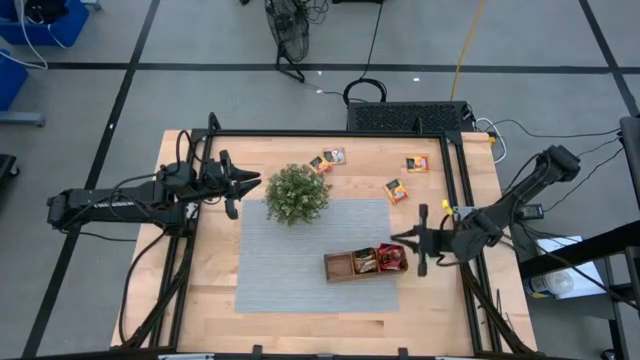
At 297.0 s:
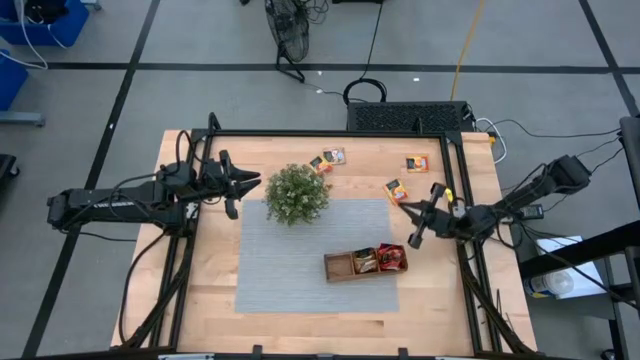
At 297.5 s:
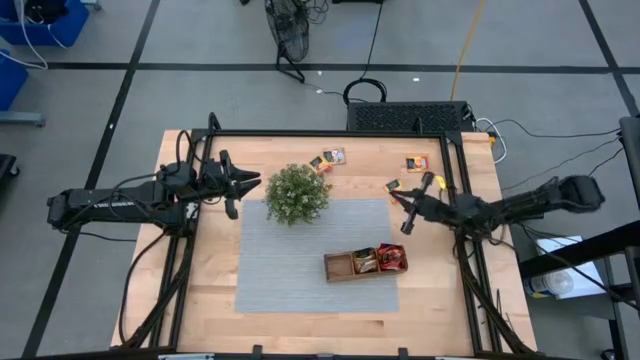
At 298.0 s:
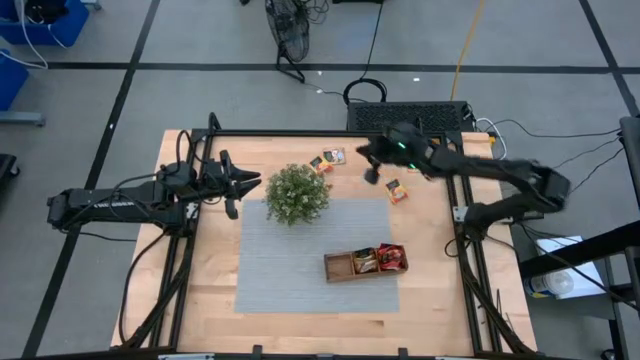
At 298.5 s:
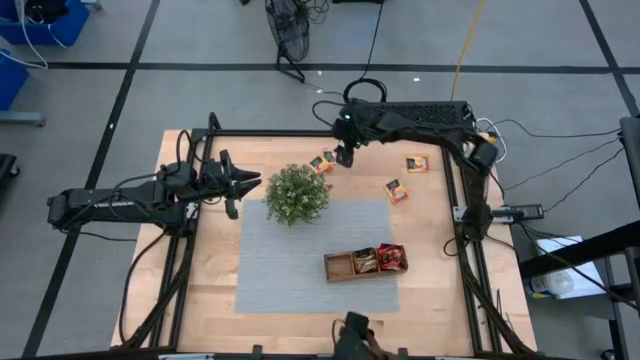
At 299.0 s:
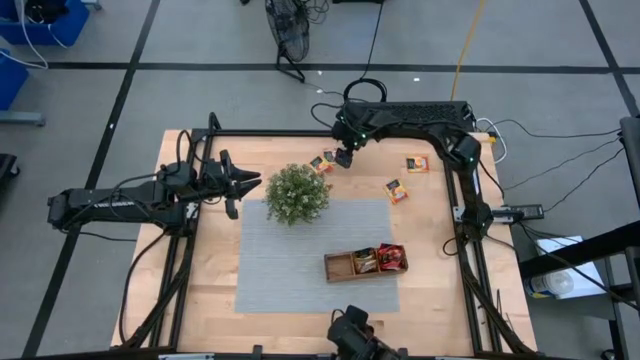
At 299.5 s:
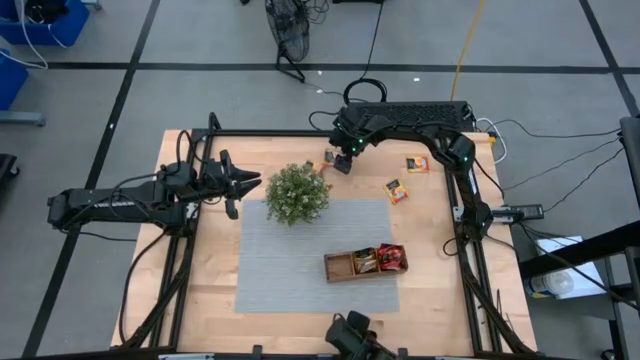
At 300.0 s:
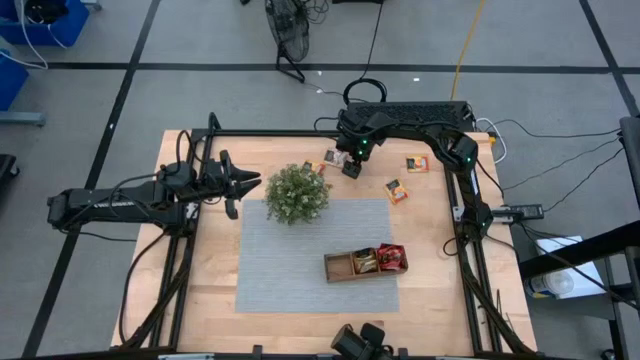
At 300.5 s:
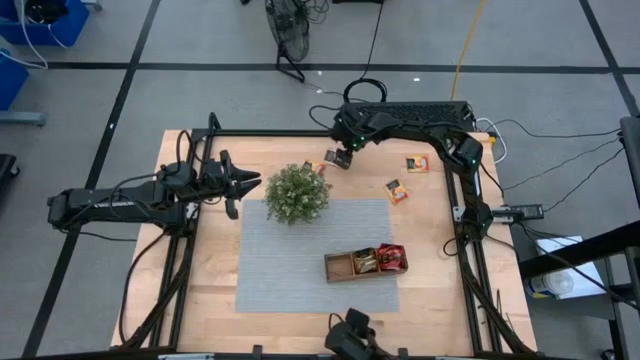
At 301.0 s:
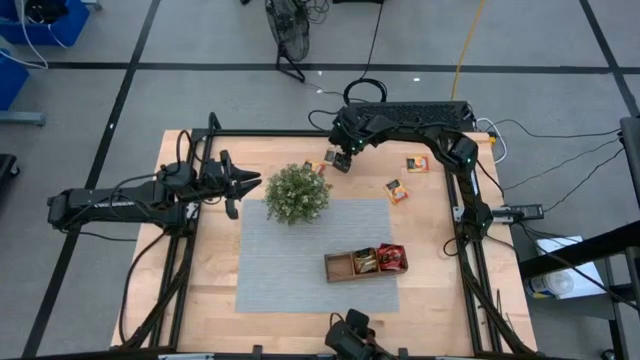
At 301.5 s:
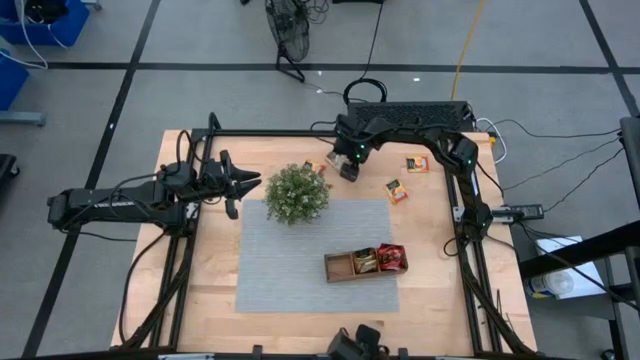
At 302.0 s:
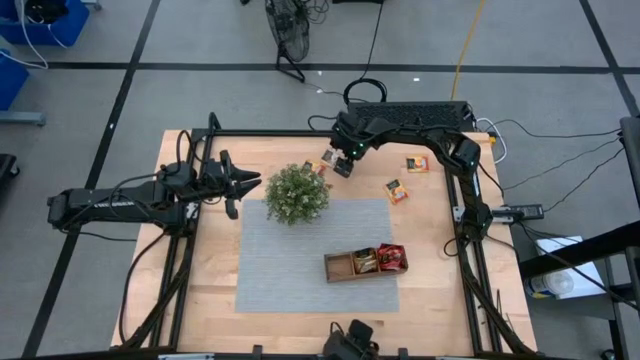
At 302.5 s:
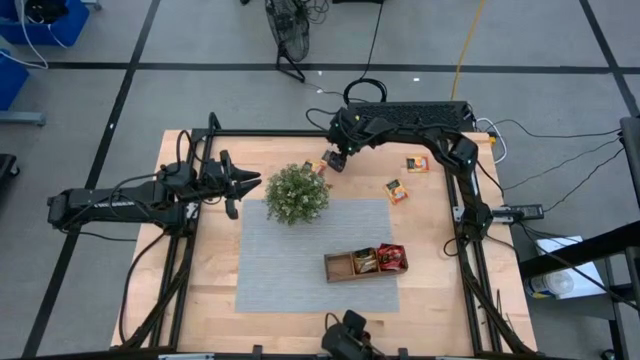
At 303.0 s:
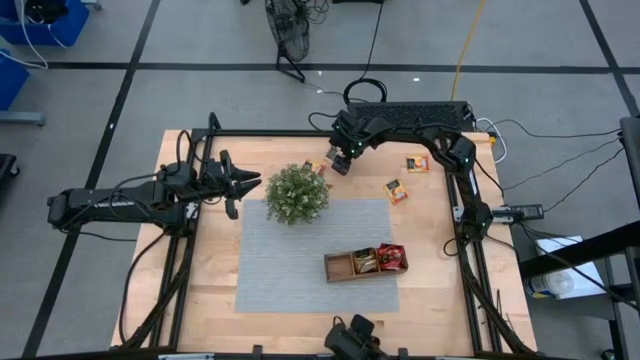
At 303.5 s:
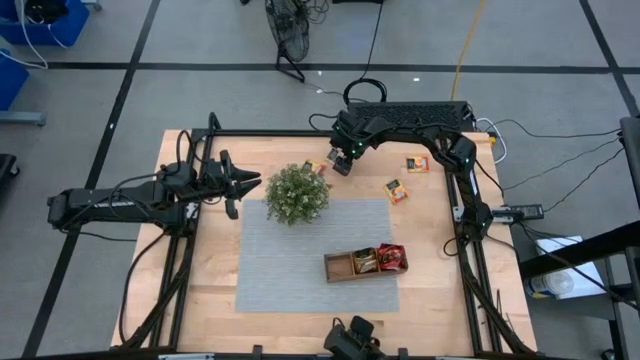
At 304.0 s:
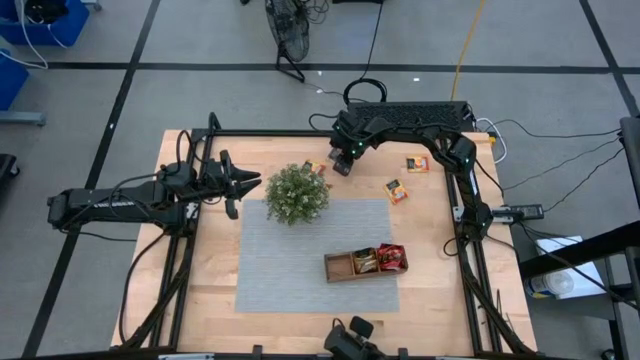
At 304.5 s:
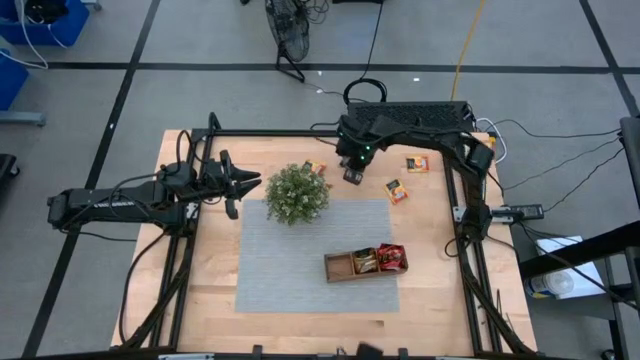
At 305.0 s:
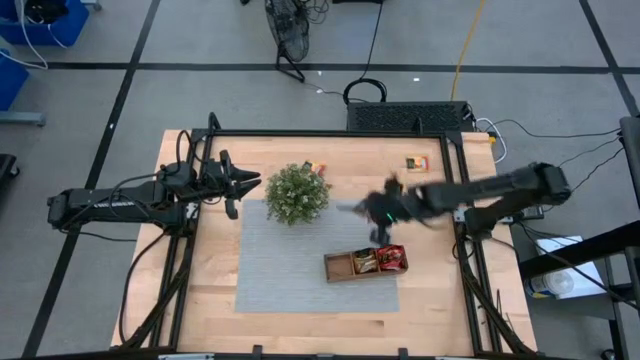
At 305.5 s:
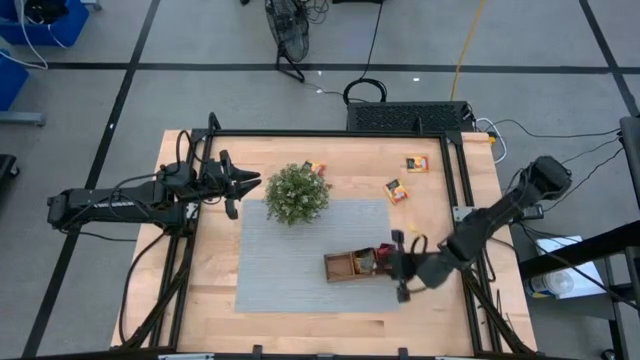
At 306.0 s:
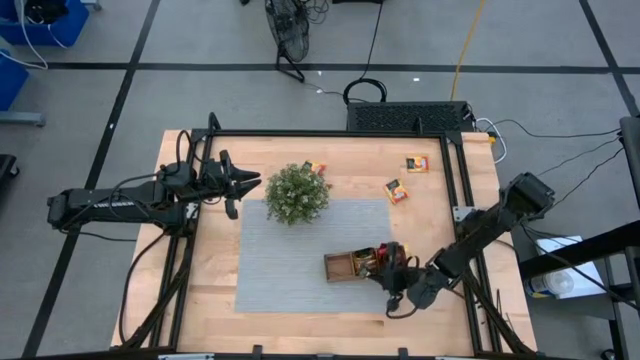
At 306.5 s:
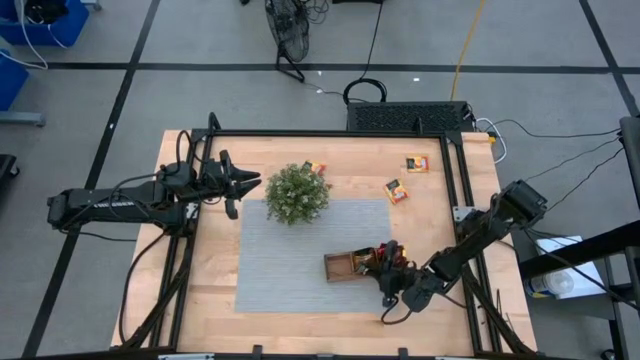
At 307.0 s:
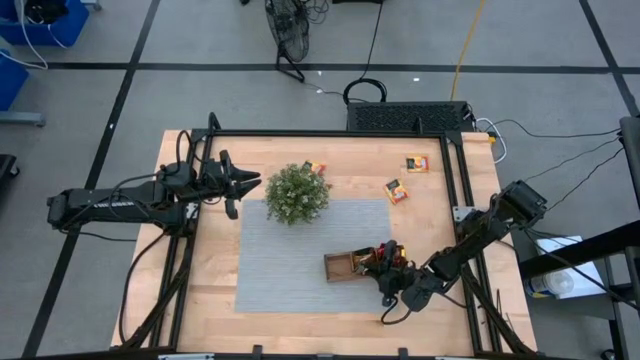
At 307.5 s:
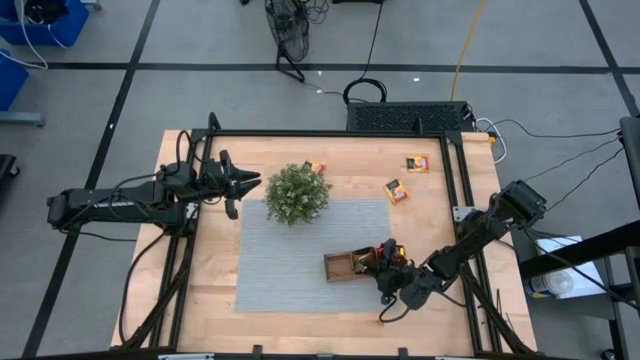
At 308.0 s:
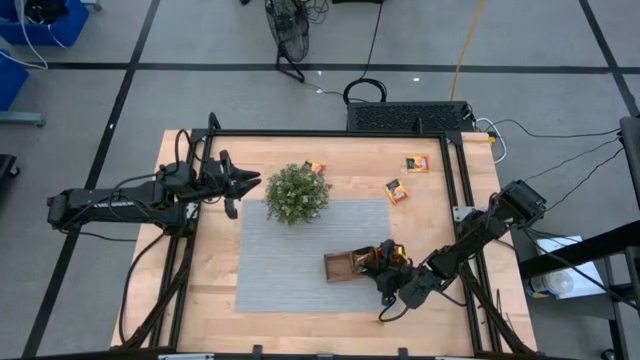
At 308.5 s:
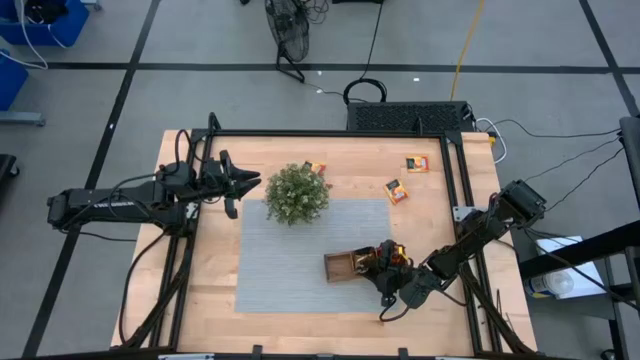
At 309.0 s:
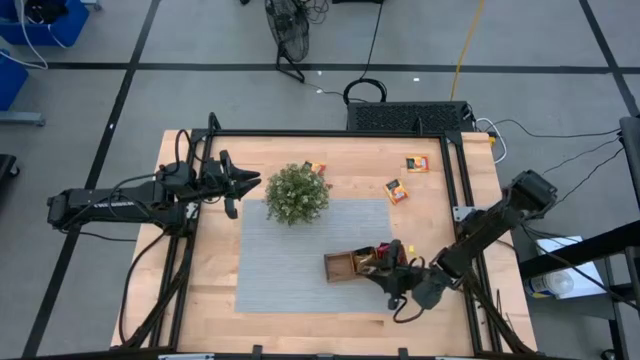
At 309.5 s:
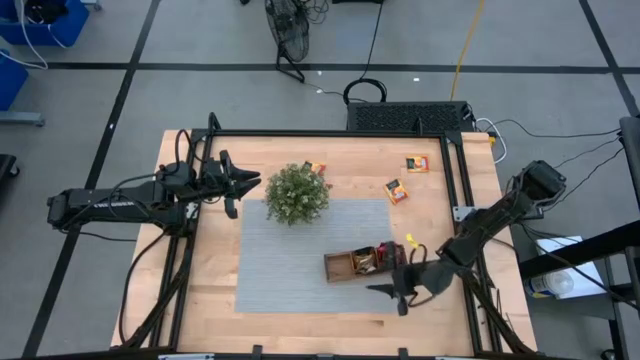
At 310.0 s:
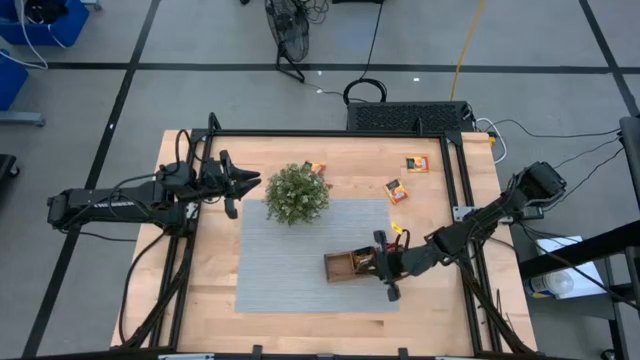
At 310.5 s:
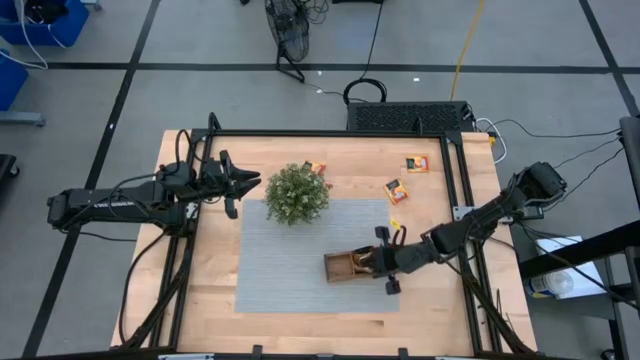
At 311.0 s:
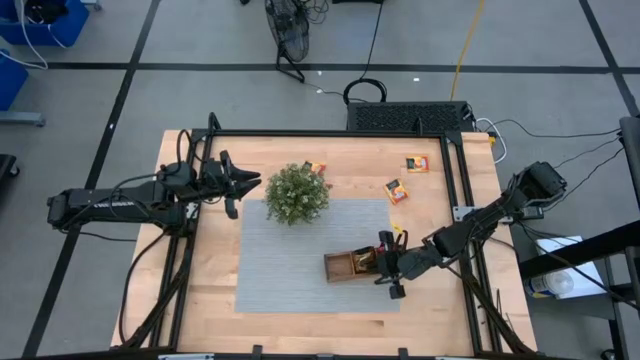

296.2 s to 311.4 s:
Task: Pick & Place Tea
Put the apple tea sachet into the brown organizer

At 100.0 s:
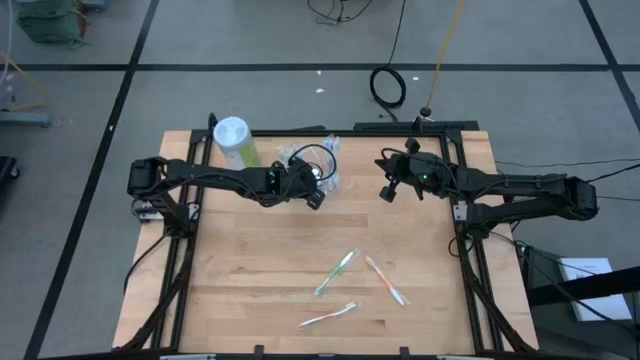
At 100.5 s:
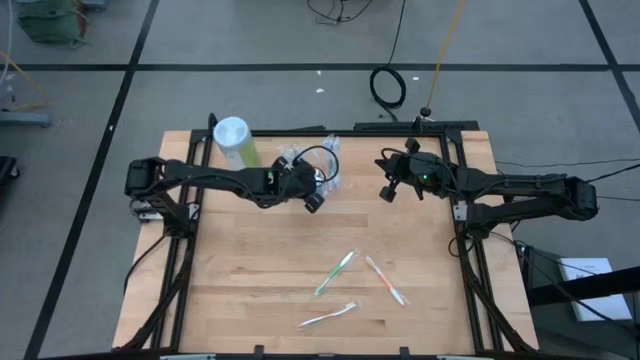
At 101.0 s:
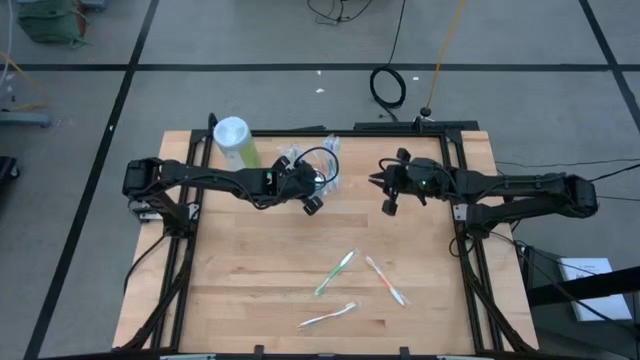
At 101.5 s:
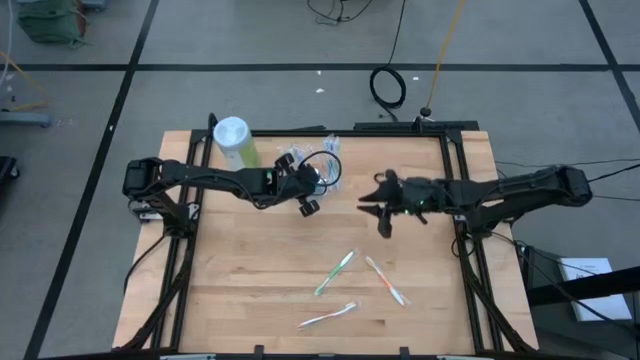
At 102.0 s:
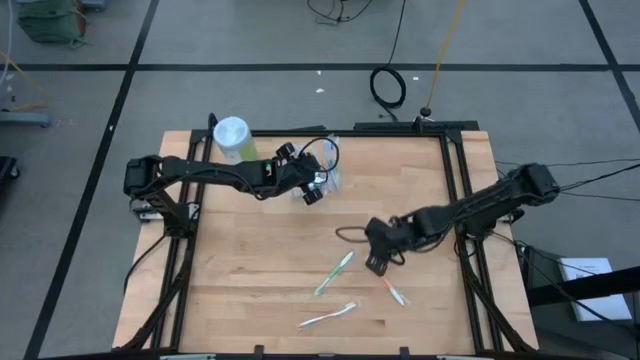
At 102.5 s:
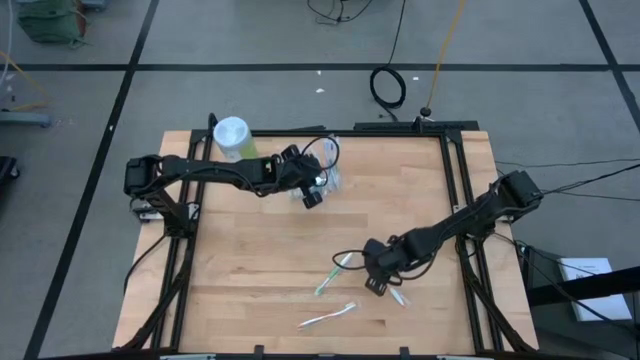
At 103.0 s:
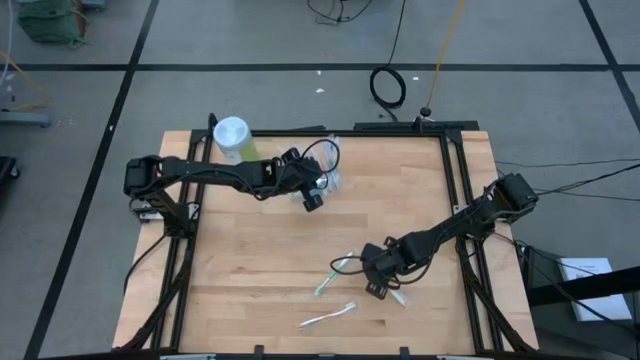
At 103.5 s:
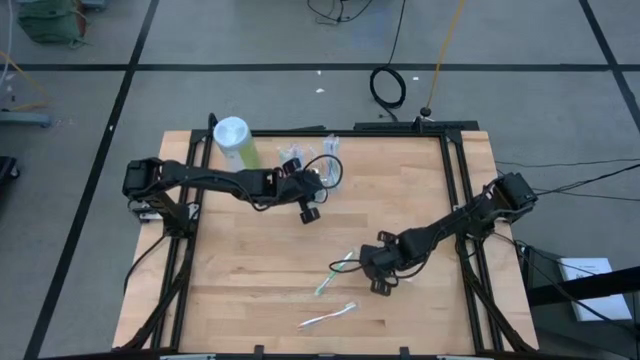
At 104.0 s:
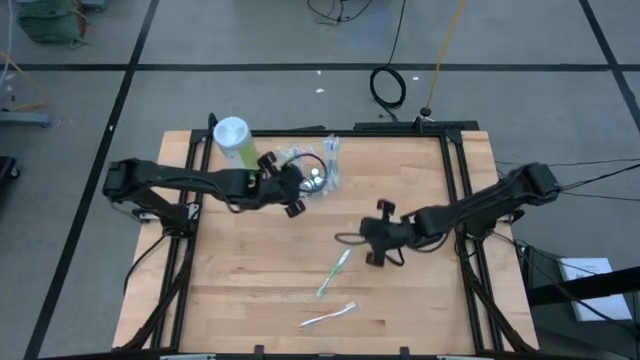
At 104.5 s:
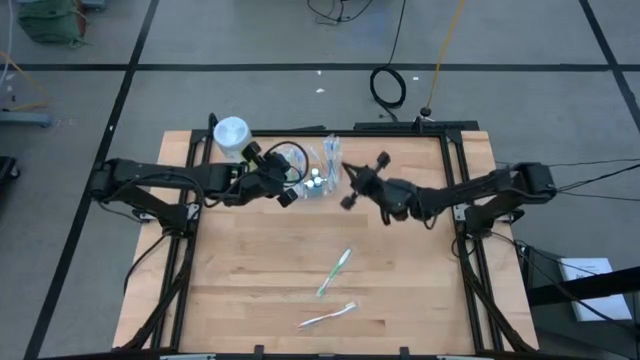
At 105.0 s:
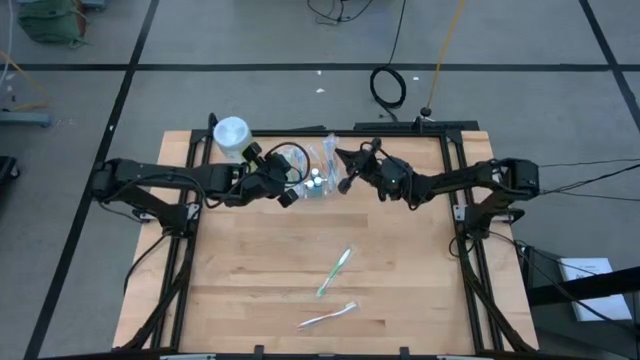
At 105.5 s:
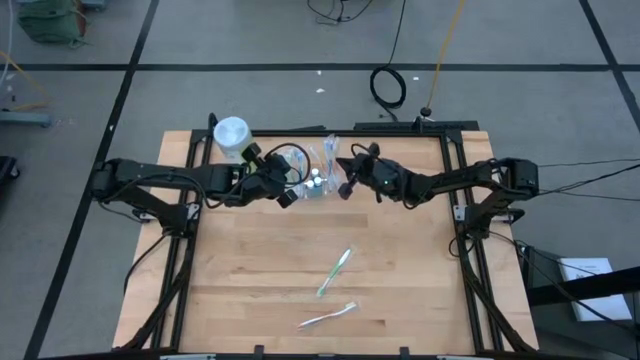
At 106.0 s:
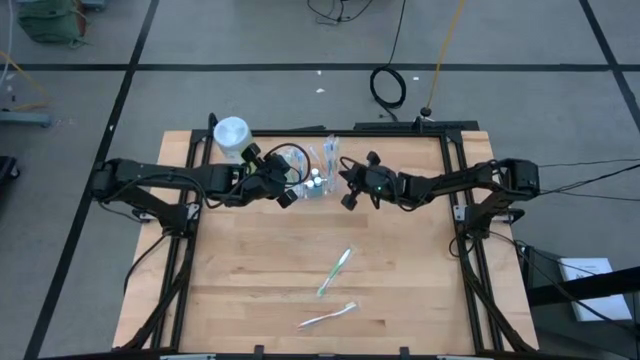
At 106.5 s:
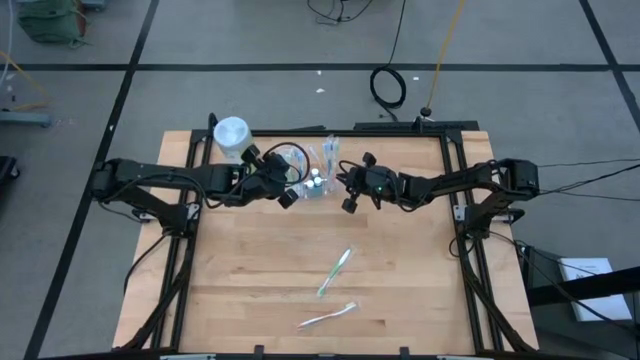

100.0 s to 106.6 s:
Task: Pick & Place toothbrushing station
Put the orange toothbrush into the transparent organizer
